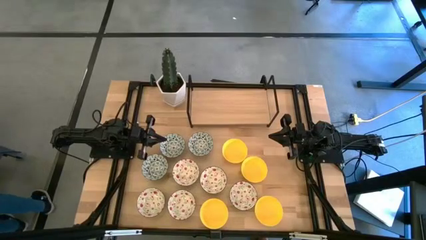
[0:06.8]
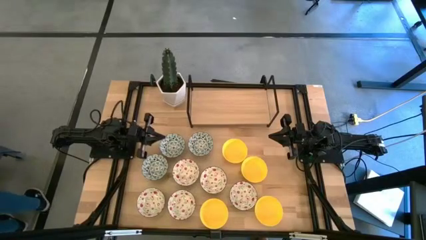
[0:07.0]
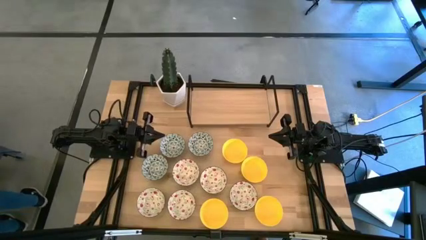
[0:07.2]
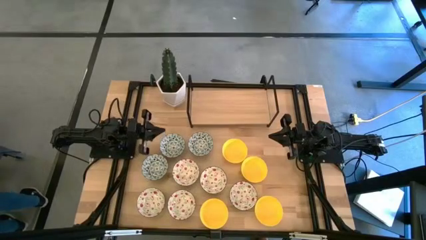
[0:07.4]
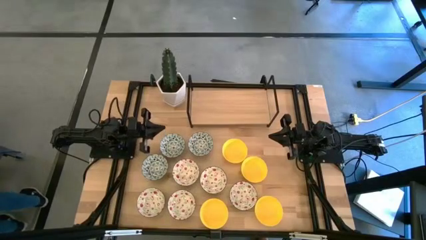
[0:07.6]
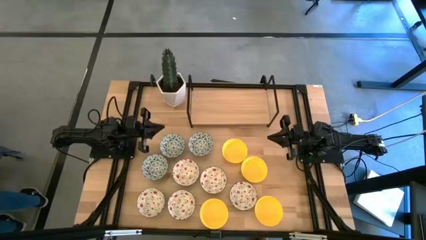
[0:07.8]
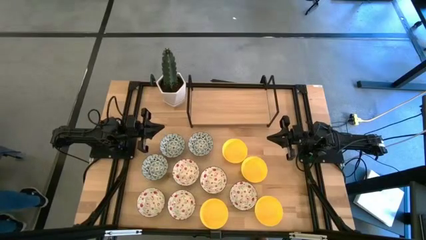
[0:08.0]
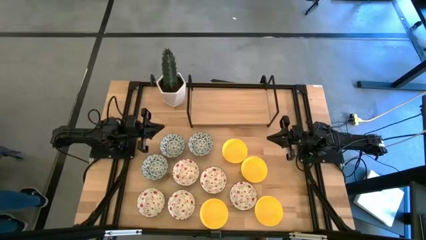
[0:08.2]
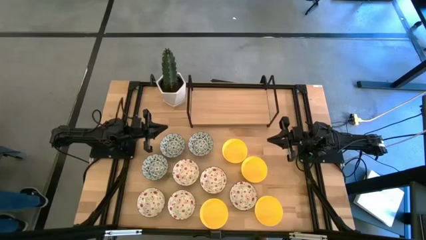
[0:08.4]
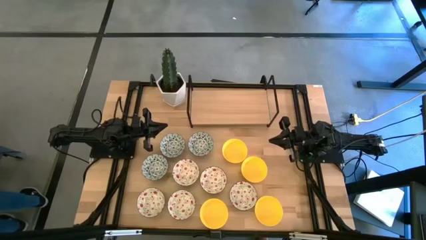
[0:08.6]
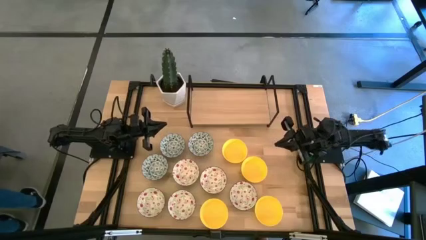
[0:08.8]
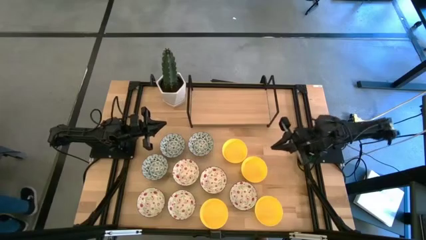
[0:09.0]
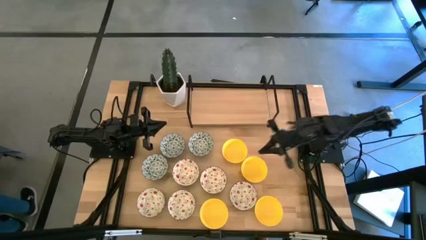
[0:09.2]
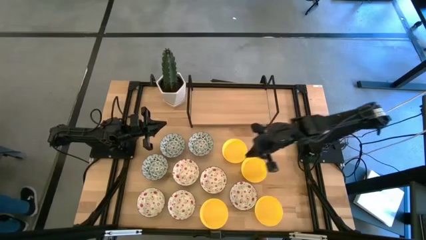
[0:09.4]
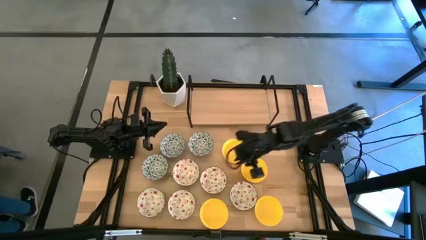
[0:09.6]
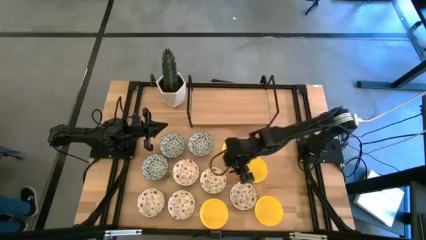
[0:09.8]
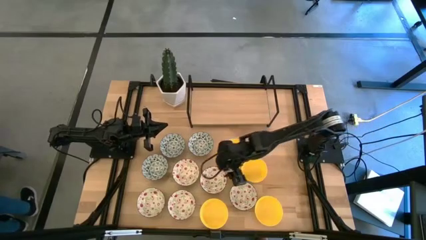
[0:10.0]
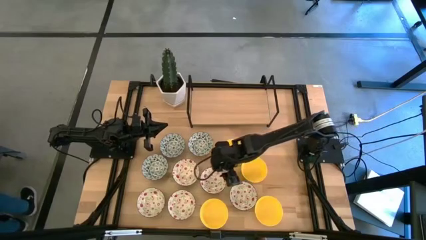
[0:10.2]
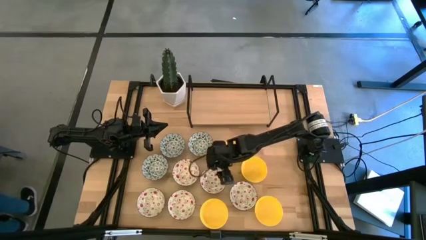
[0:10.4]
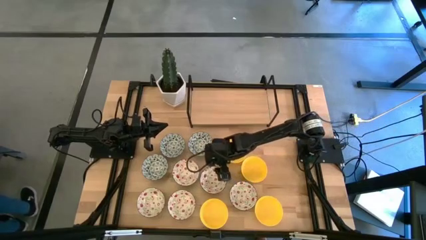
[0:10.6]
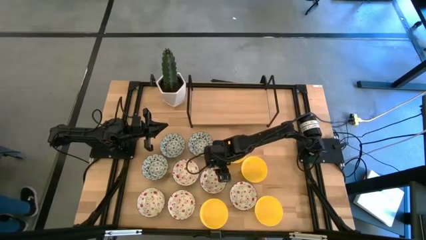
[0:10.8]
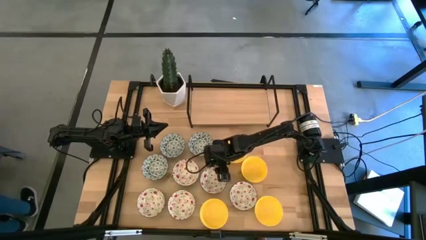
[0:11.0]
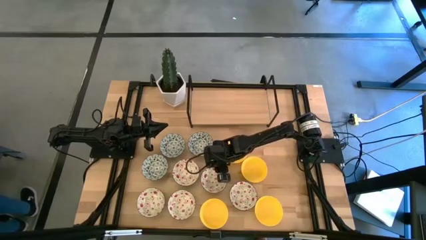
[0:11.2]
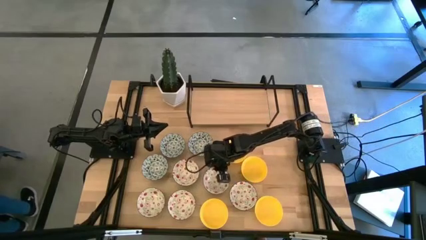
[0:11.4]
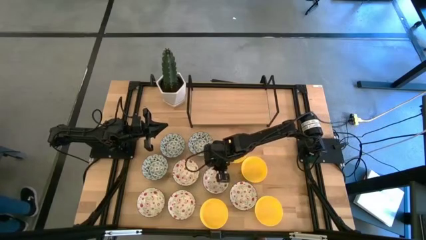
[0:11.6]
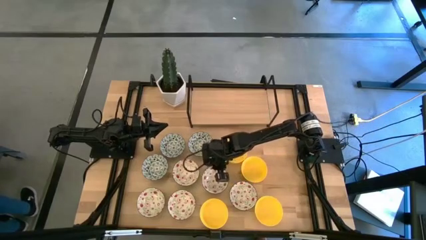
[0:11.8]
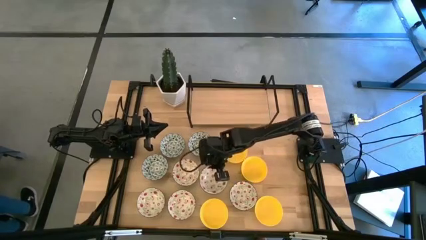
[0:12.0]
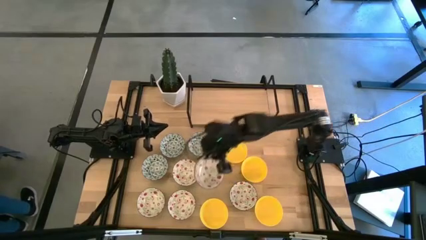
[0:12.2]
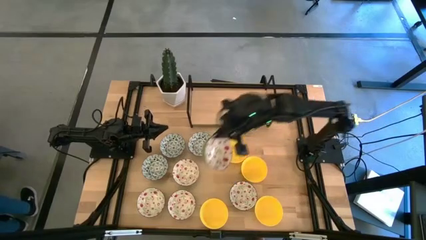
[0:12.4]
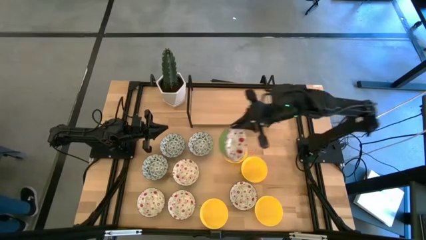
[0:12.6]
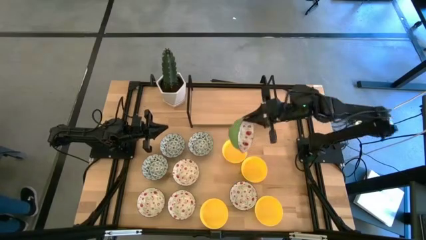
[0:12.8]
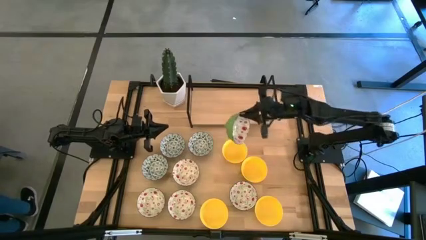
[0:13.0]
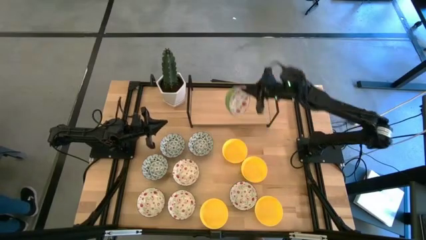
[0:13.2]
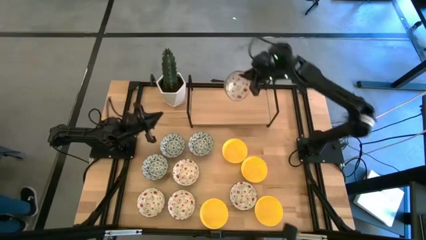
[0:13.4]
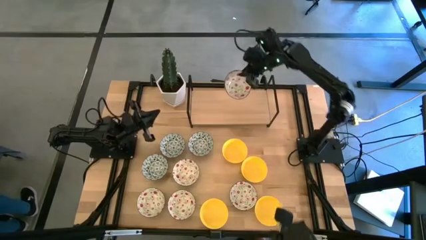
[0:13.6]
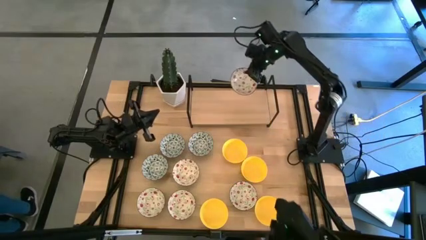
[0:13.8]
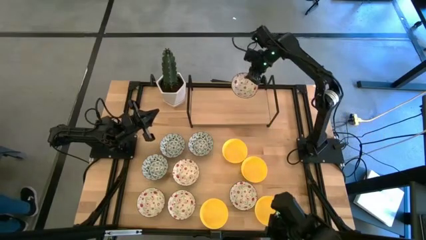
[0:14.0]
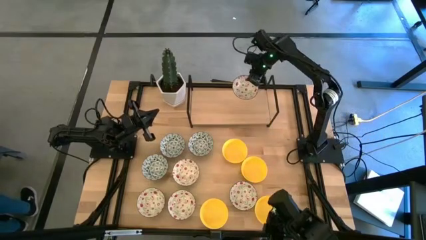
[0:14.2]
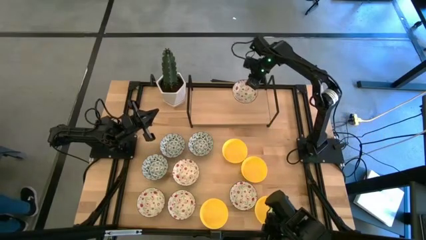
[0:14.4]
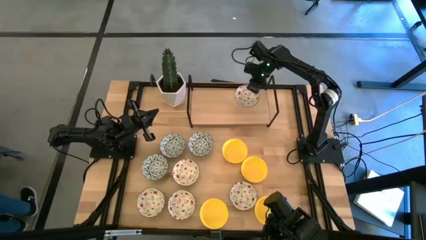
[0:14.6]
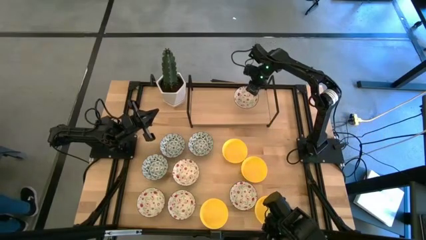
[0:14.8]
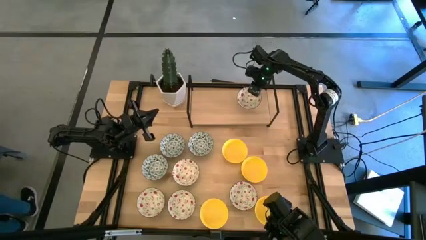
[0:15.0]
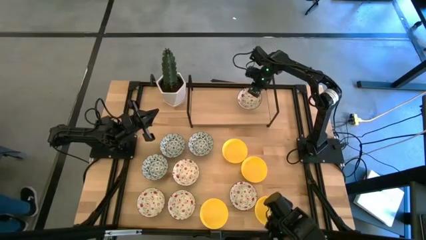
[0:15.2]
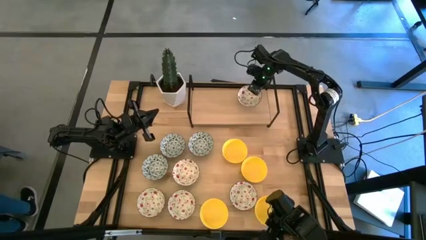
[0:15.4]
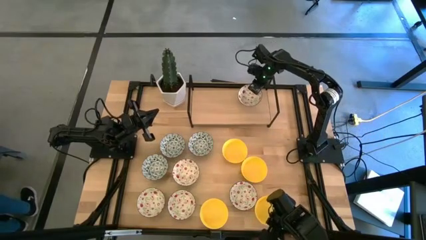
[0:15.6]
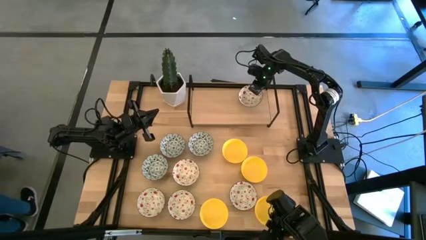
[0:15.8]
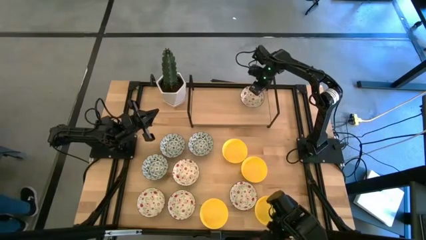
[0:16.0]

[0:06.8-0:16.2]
Task: Pick & Place Mini bowls
Put the green printed bowl on the shelf

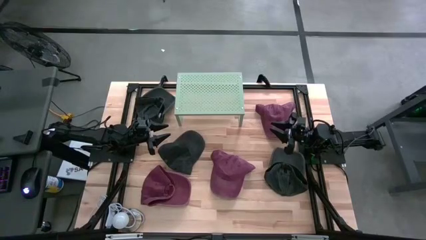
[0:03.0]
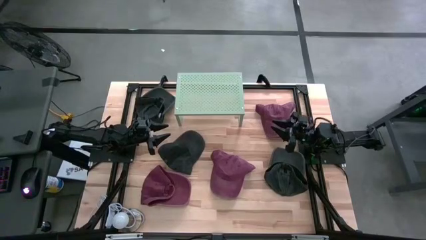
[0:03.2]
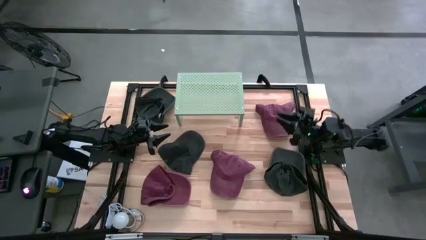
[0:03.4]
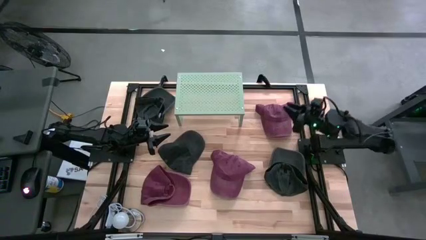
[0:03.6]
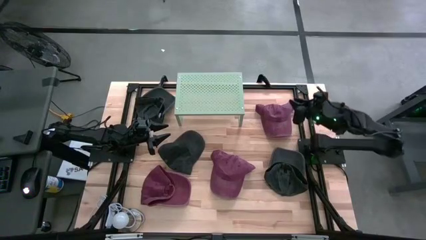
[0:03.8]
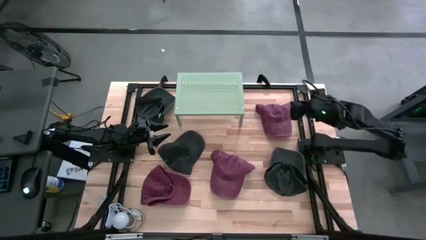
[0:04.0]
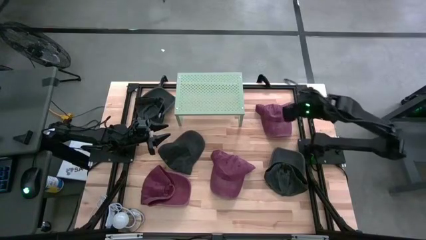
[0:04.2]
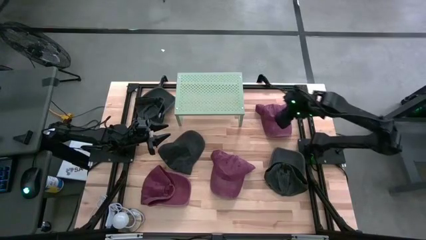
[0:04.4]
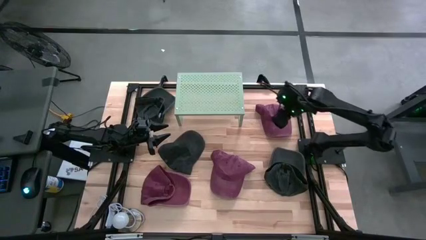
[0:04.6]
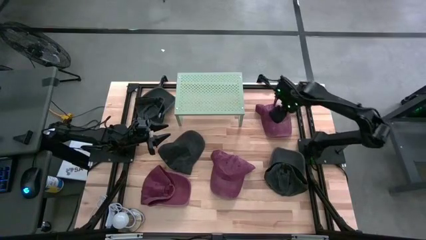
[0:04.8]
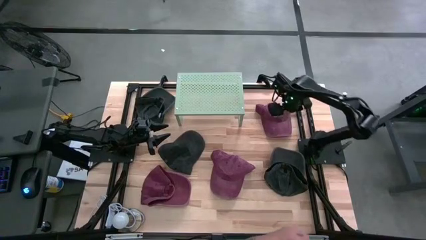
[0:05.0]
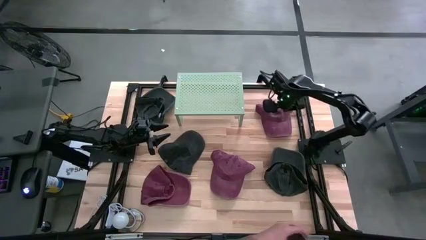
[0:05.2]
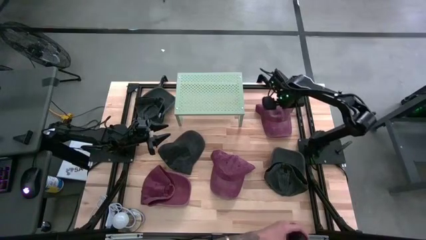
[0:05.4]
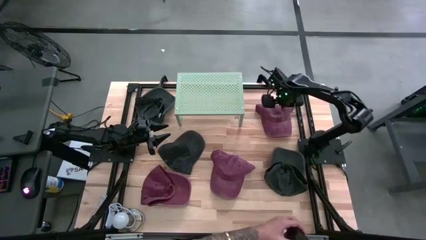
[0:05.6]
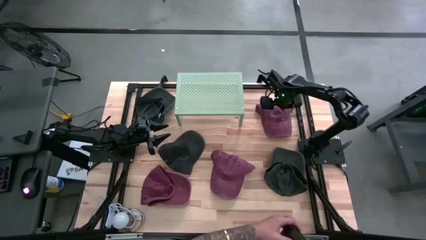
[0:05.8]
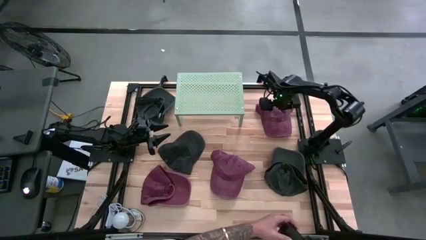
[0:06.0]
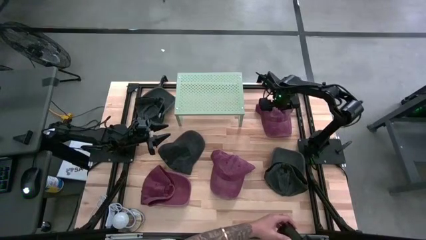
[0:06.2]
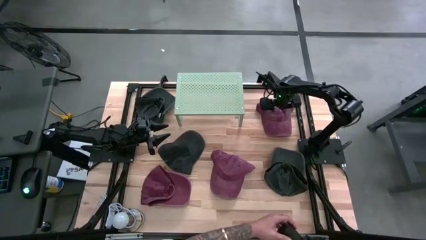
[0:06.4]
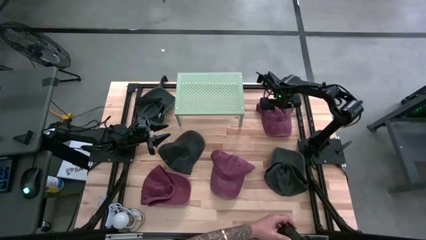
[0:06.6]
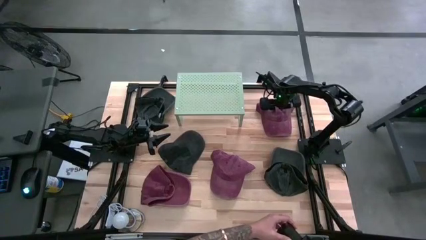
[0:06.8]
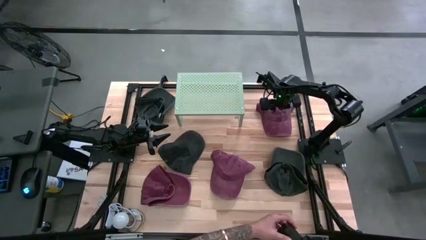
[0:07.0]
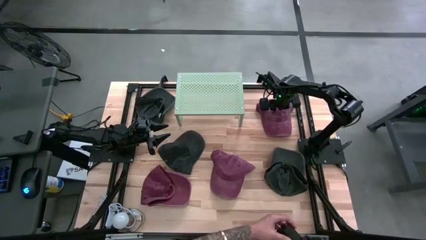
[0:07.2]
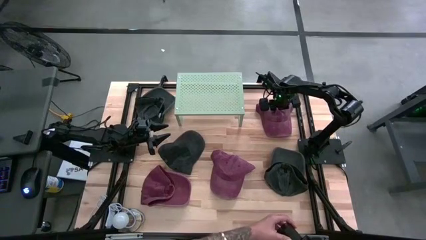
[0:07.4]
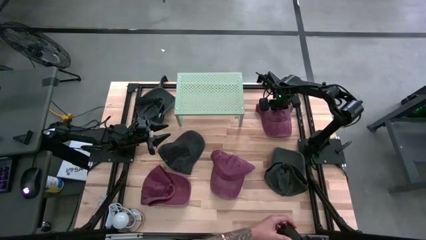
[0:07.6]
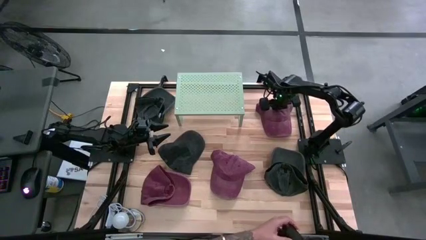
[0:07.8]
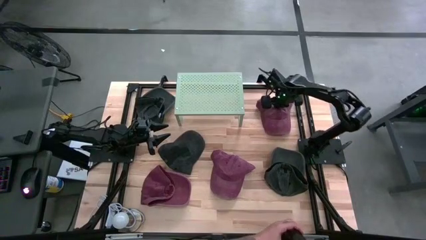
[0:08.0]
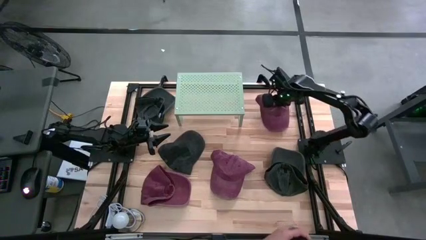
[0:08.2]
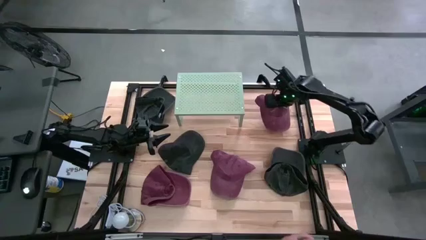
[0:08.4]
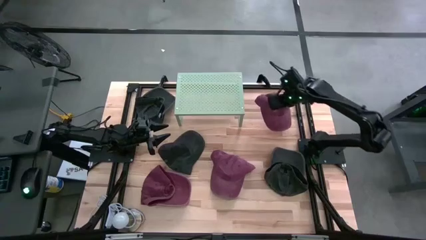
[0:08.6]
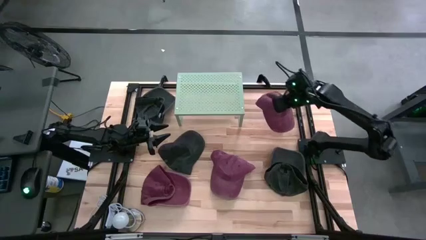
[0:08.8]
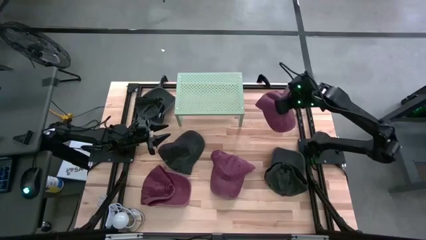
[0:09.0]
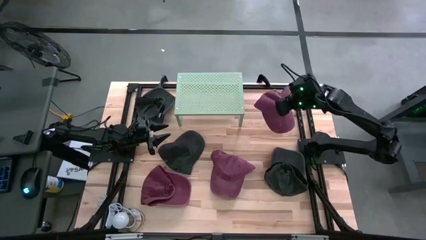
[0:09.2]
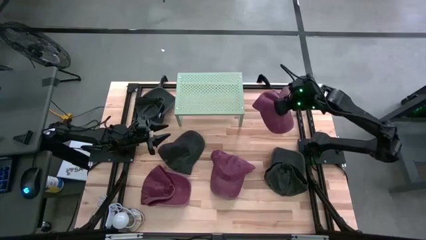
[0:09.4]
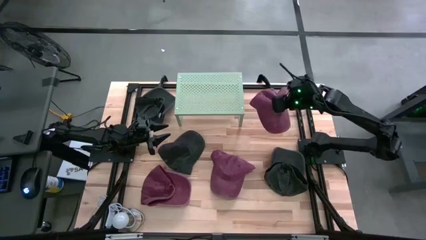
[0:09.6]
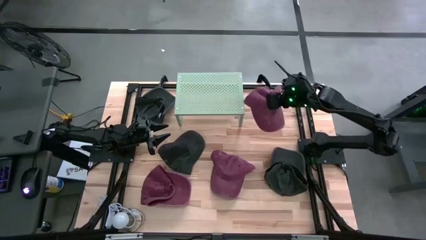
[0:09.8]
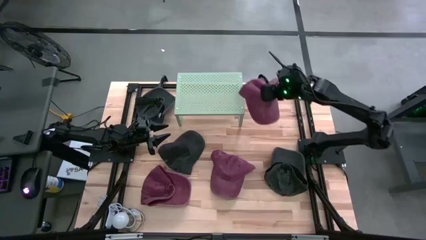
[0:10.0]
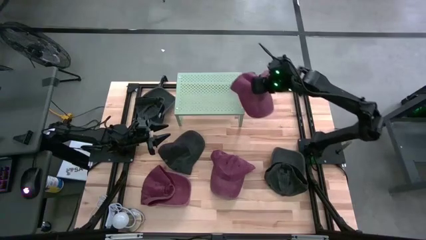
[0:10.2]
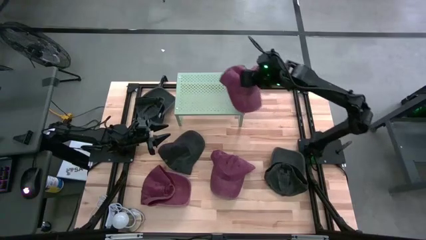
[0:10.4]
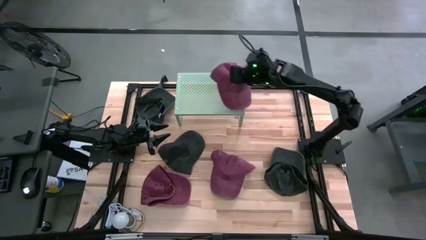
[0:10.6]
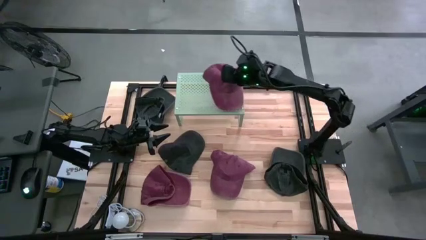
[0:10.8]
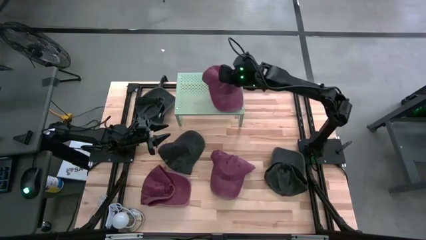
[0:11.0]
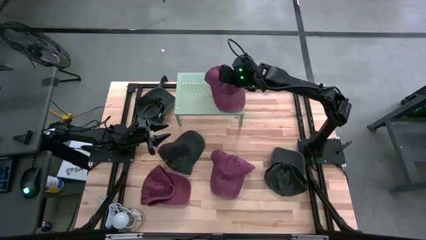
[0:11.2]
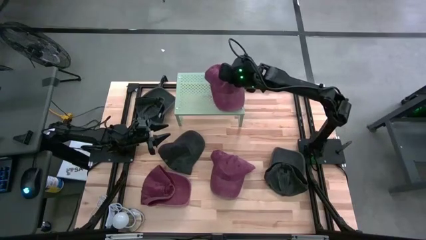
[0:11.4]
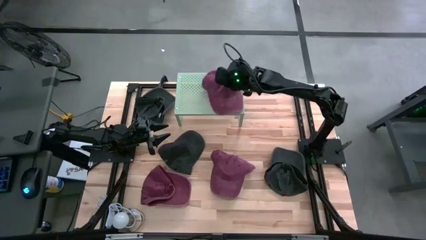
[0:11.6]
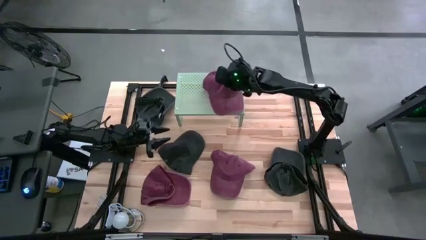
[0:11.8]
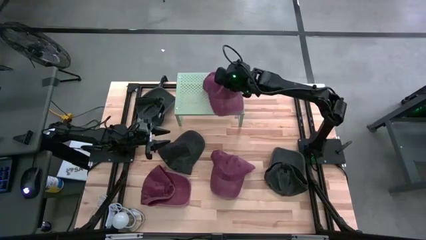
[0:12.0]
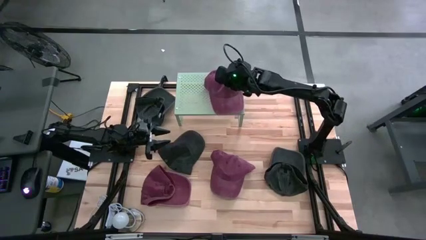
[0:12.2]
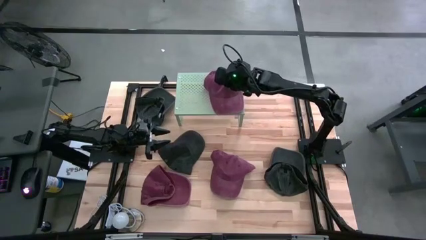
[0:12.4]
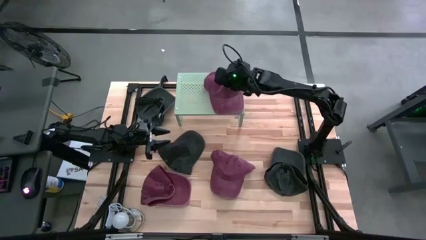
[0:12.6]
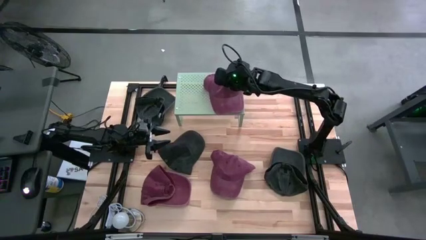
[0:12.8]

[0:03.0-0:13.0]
Task: Pick & Place hat
Put the top red cap on the shelf
